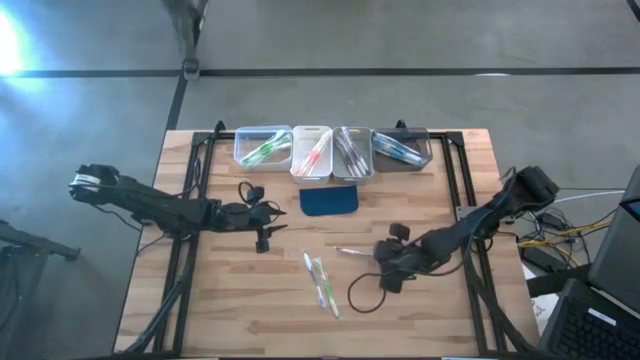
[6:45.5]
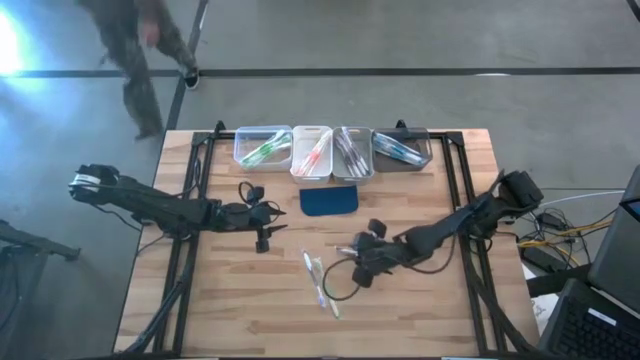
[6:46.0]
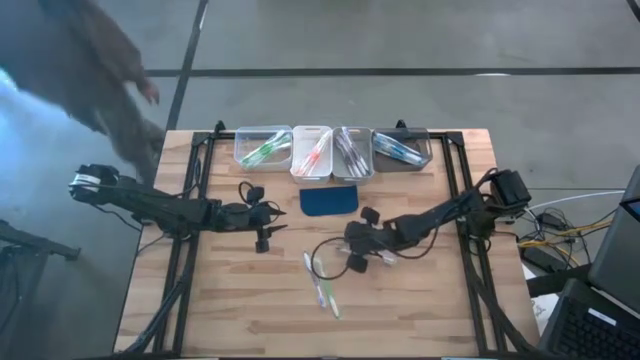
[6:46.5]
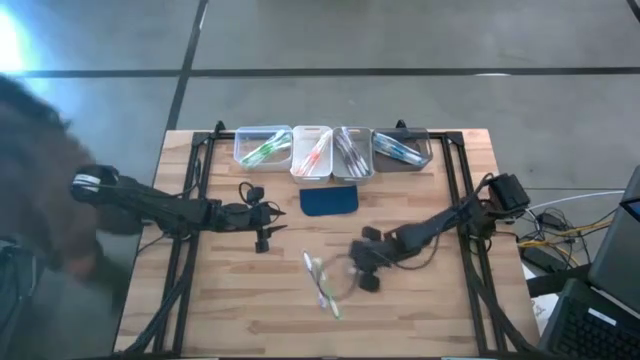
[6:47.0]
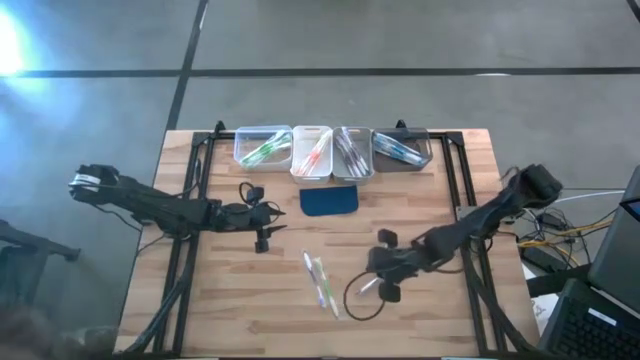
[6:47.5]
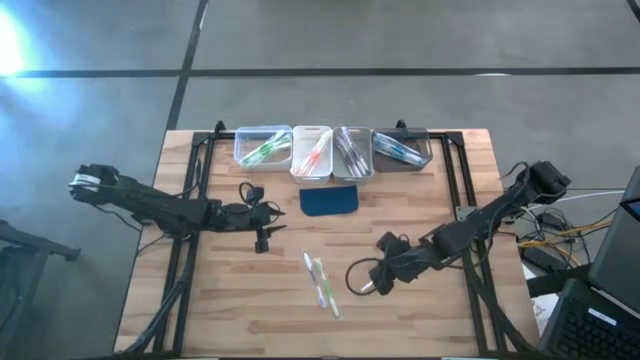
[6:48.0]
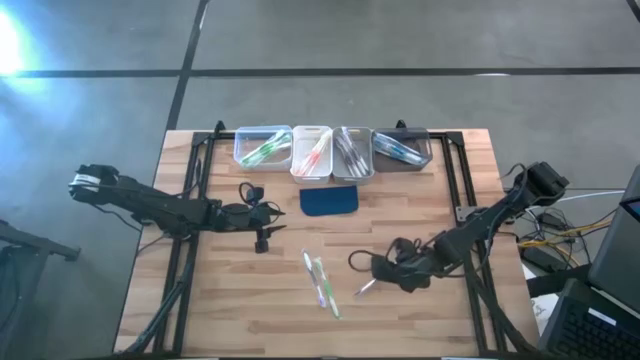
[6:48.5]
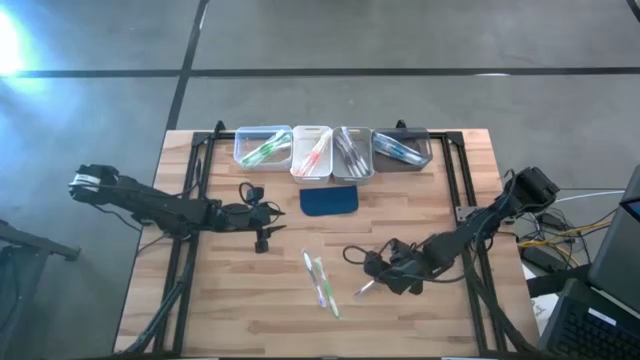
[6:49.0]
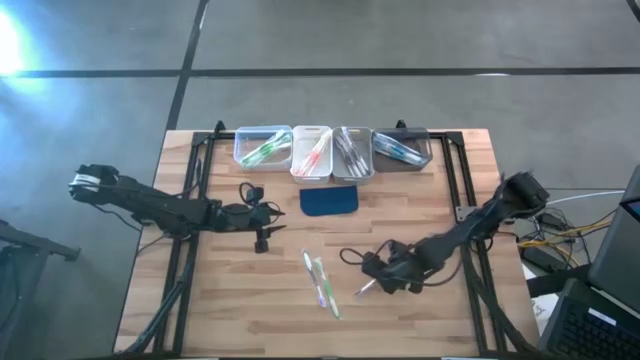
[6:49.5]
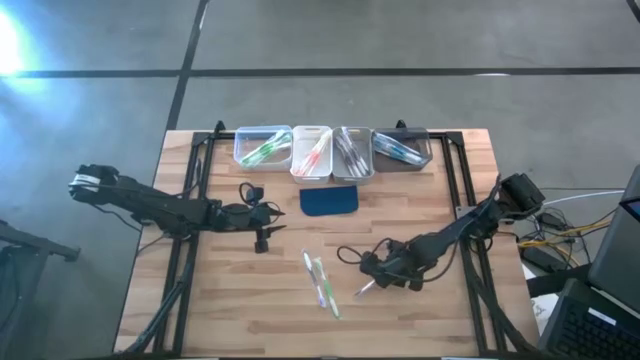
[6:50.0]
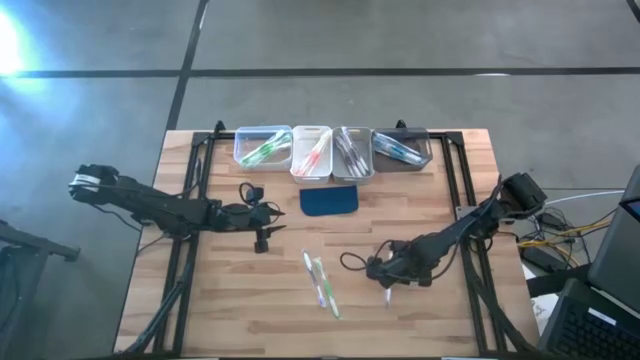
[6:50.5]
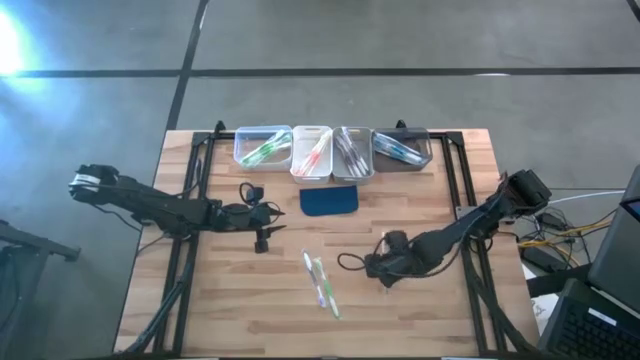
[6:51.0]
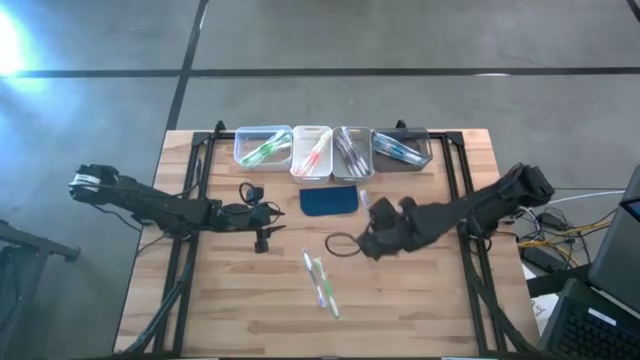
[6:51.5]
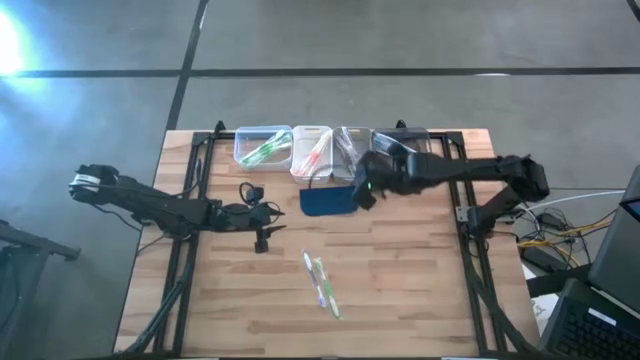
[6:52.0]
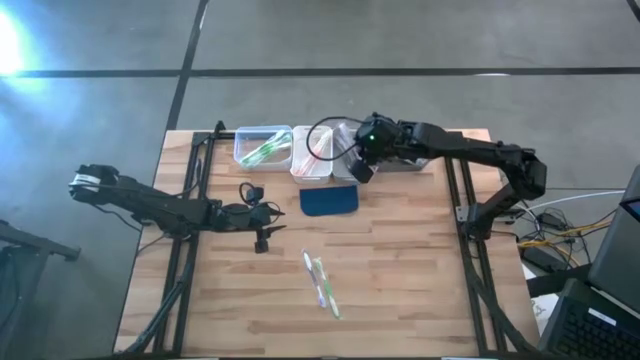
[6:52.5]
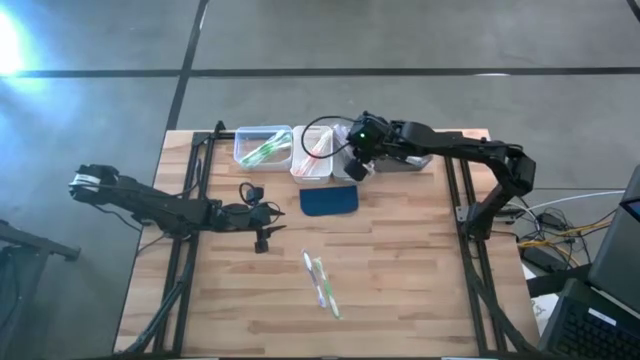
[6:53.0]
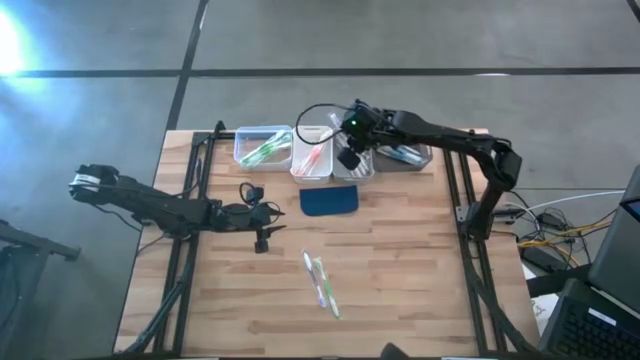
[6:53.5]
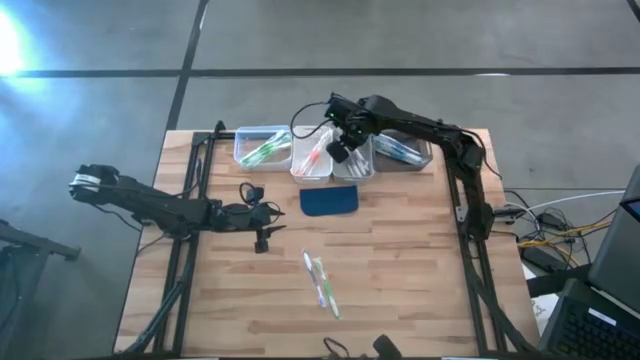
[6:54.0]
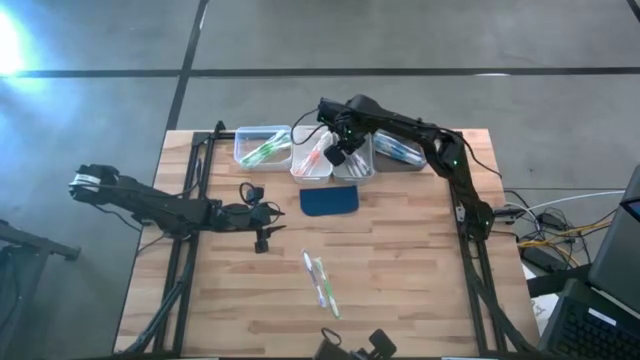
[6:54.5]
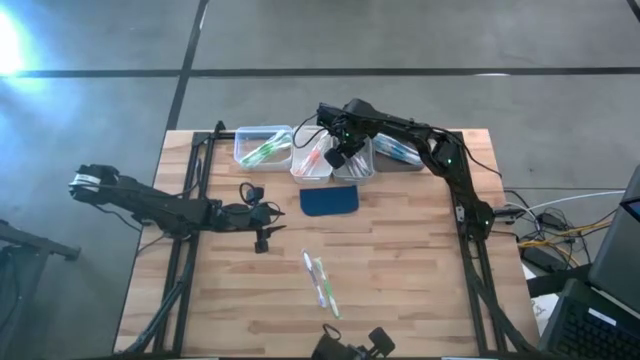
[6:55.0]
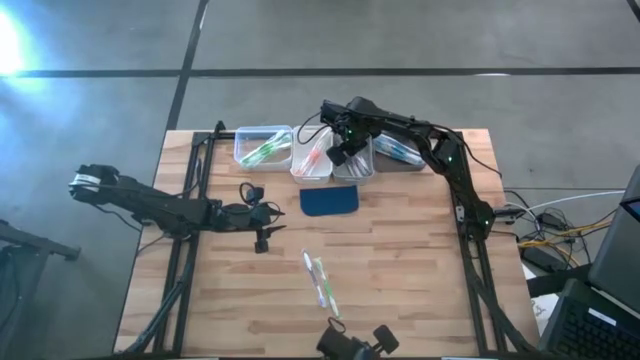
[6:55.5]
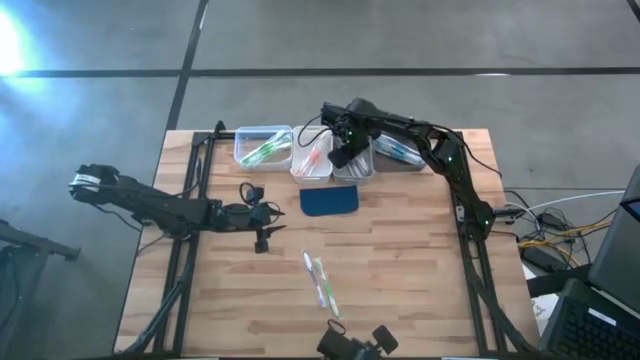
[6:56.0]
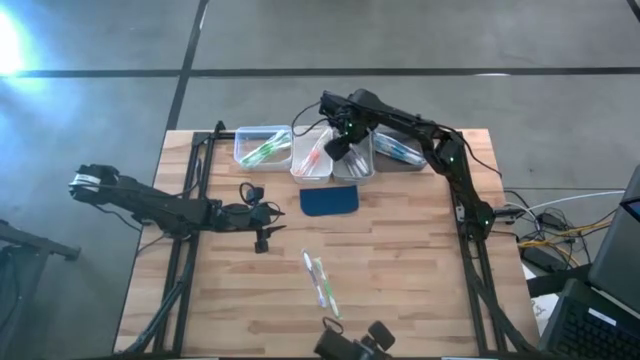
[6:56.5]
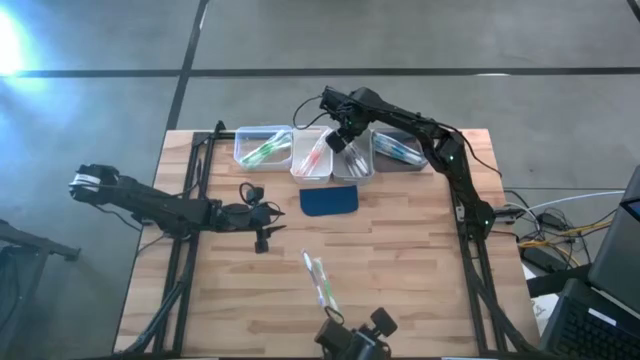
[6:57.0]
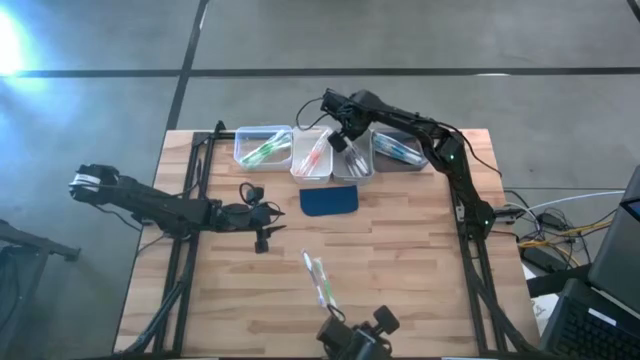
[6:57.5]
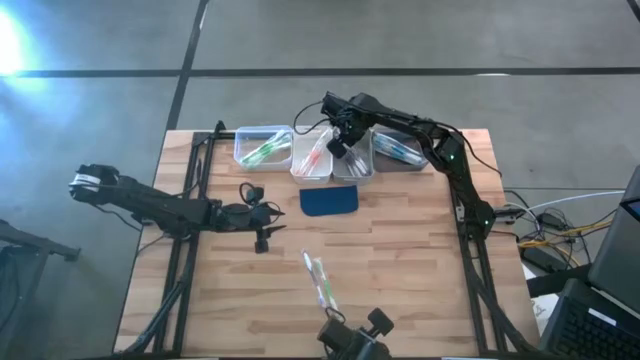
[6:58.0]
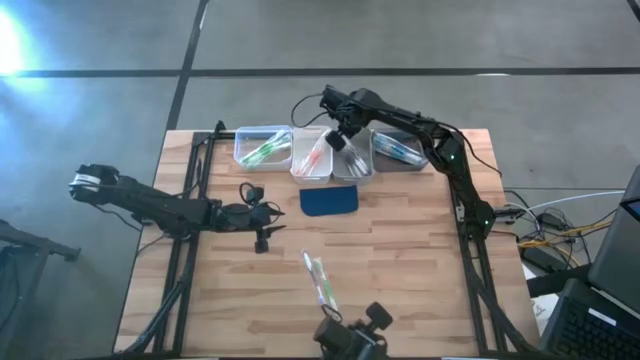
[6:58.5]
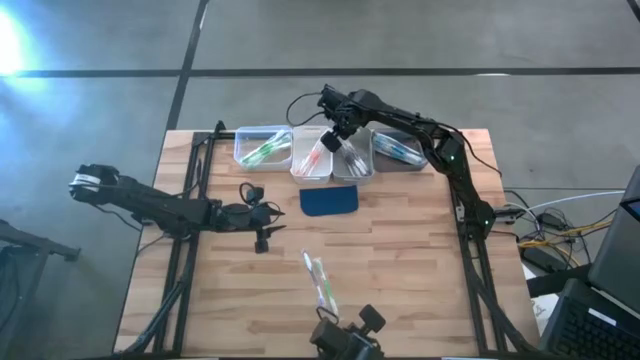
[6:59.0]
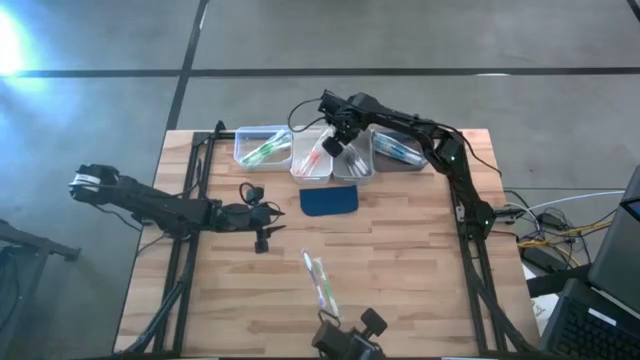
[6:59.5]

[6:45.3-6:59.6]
Task: Pick & Place Toothbrushes
Put the violet toothbrush into the gray bin

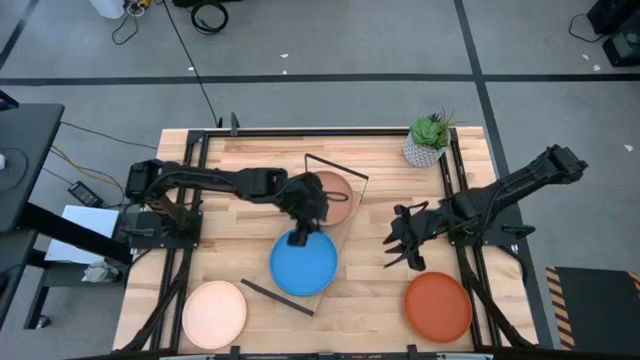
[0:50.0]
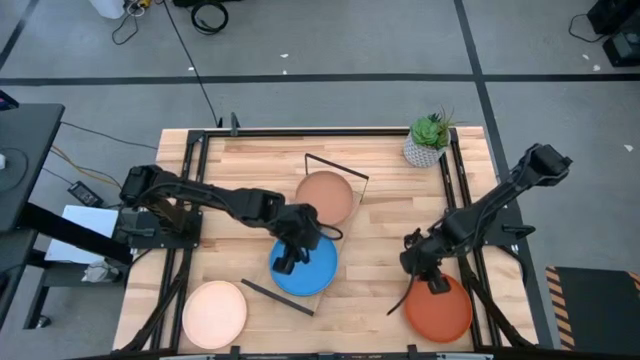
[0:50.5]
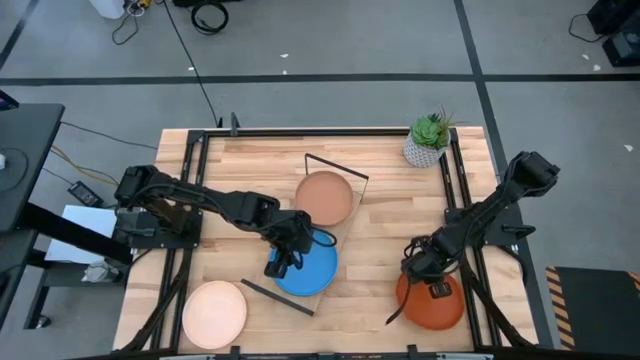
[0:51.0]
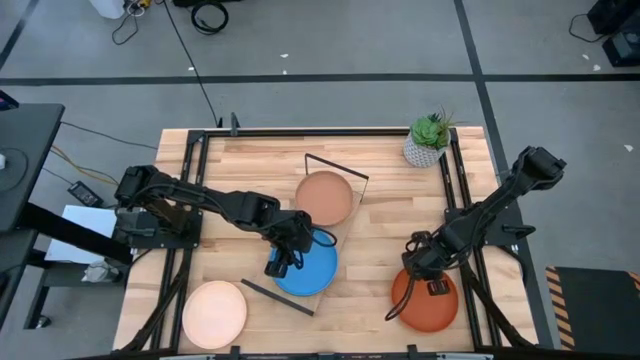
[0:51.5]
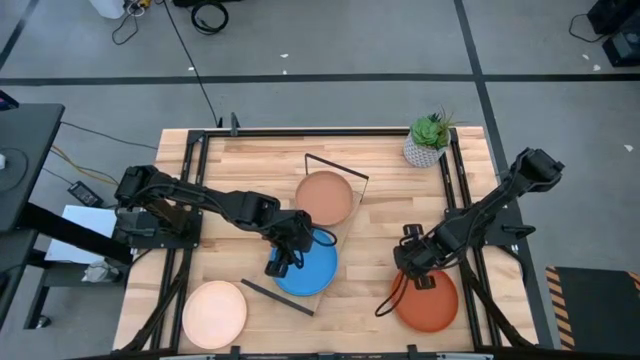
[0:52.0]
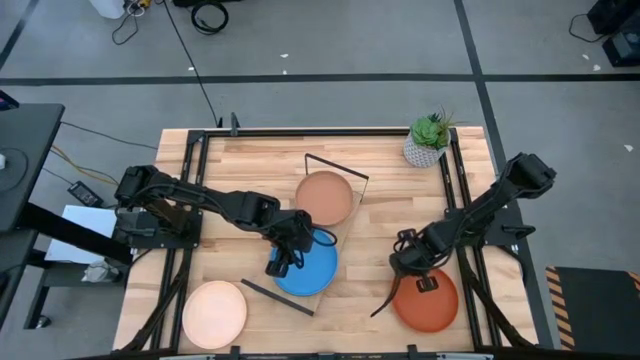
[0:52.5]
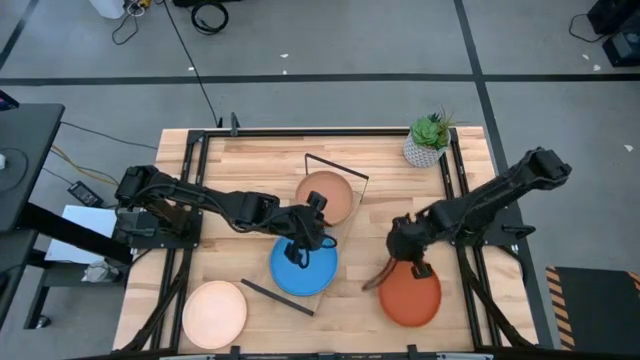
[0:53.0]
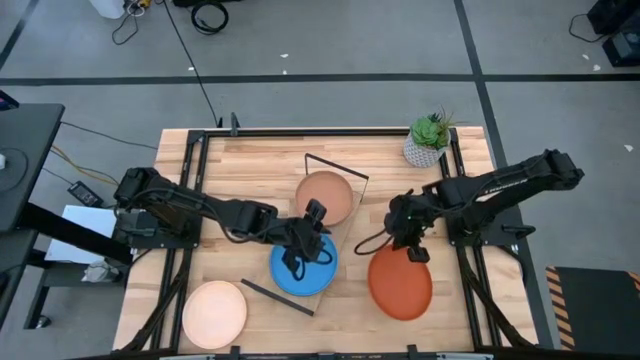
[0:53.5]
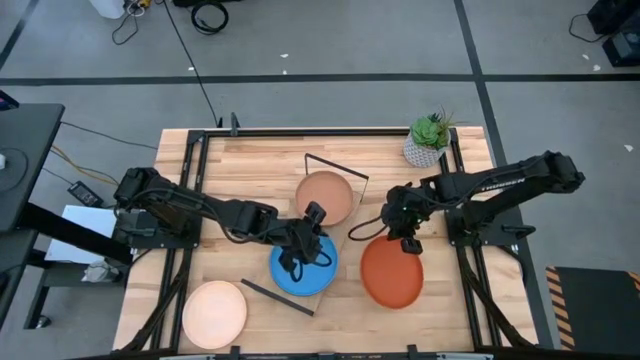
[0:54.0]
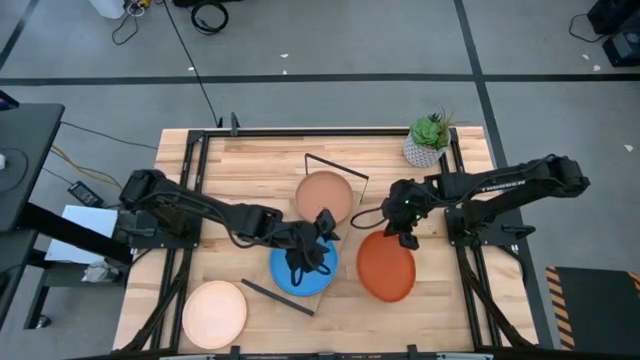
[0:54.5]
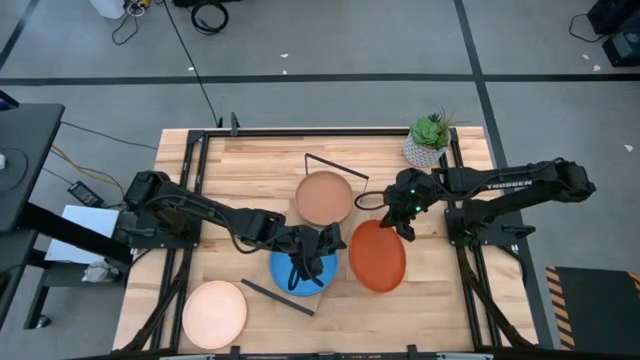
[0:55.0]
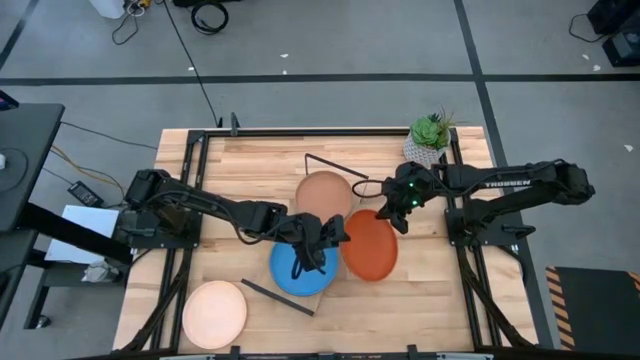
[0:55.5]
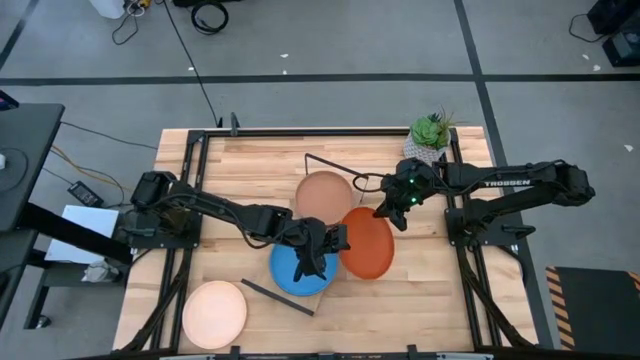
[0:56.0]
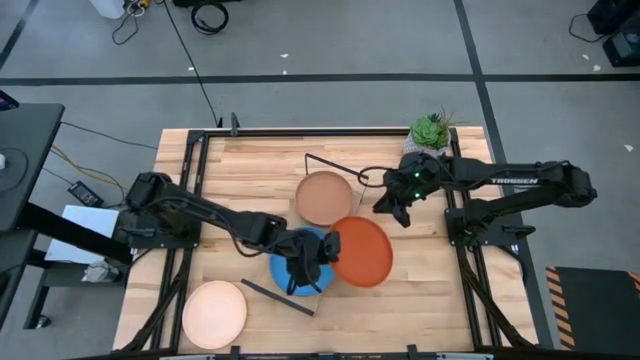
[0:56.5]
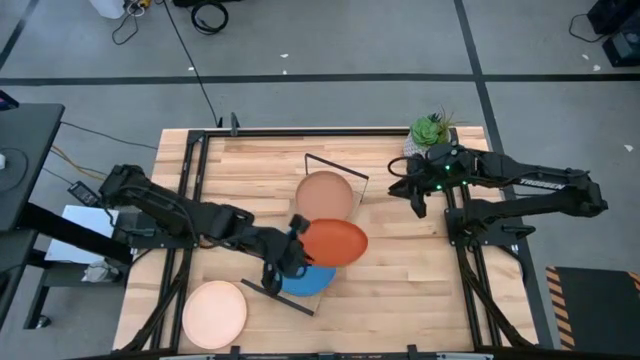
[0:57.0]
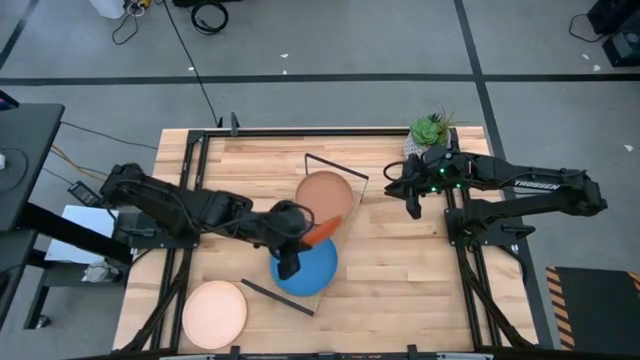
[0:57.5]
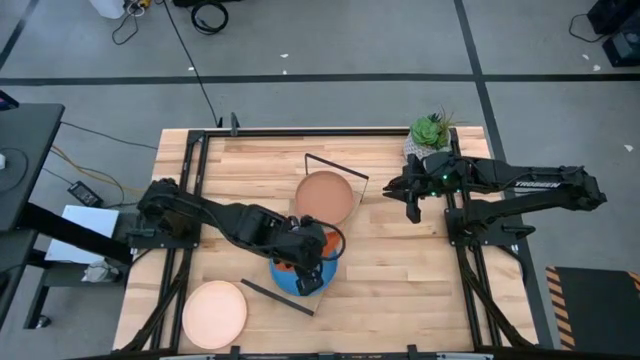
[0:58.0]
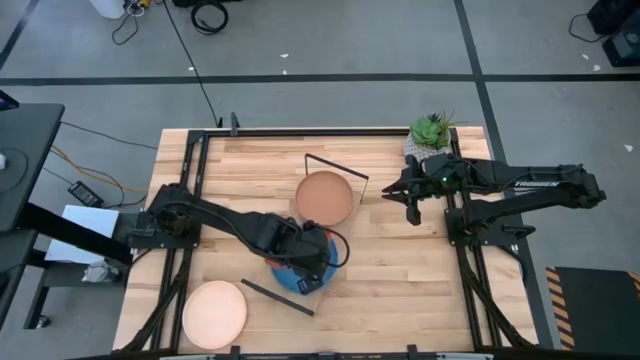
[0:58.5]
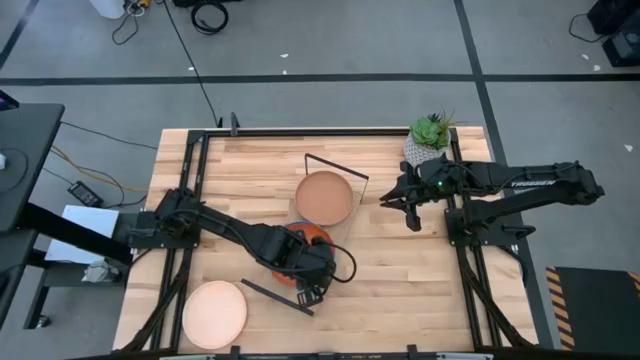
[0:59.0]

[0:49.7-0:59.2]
Task: Place and stack plates onto a shelf
Stack the orange plate on top of the blue plate
